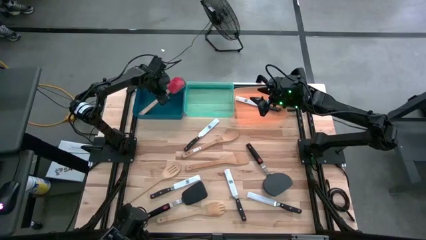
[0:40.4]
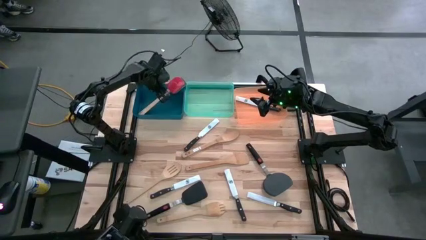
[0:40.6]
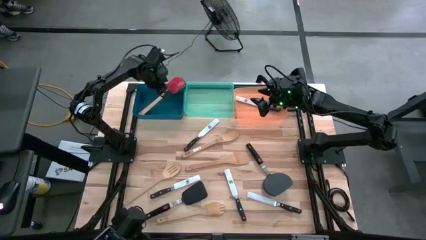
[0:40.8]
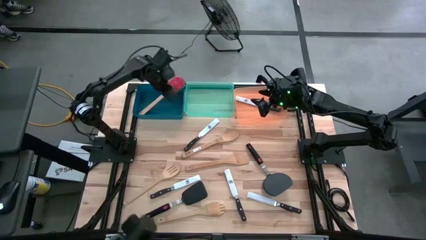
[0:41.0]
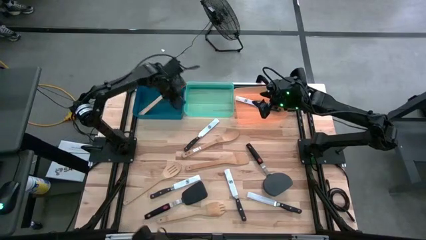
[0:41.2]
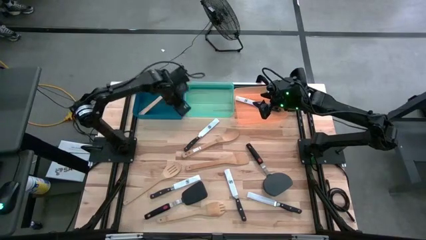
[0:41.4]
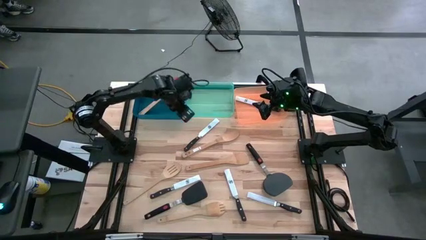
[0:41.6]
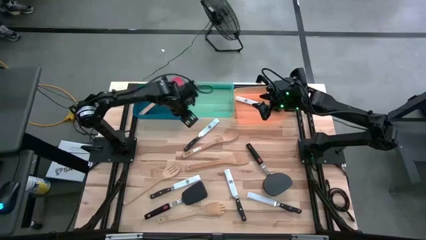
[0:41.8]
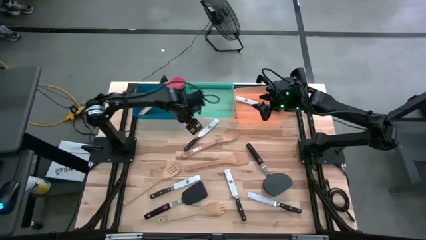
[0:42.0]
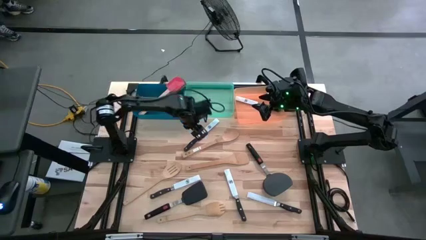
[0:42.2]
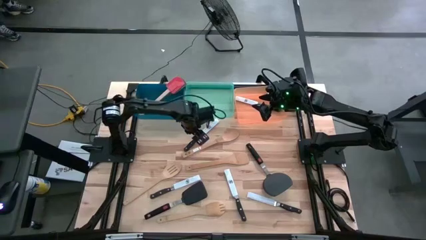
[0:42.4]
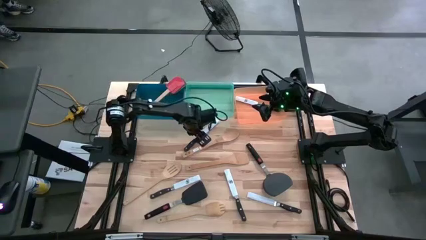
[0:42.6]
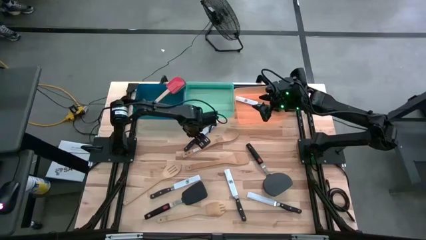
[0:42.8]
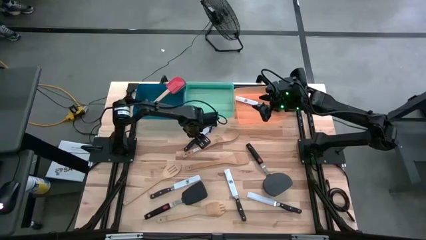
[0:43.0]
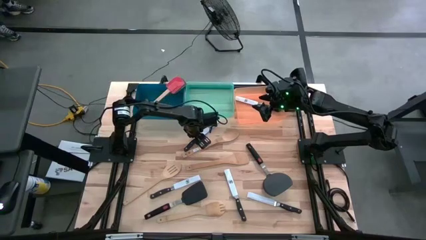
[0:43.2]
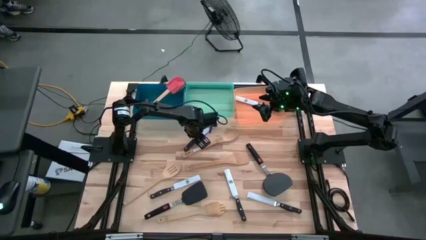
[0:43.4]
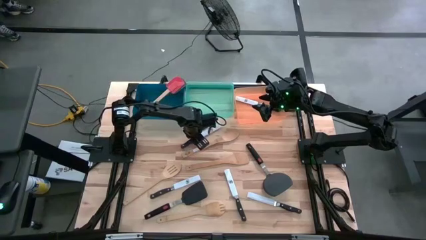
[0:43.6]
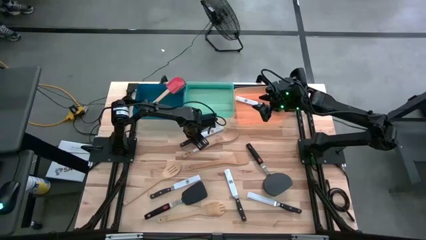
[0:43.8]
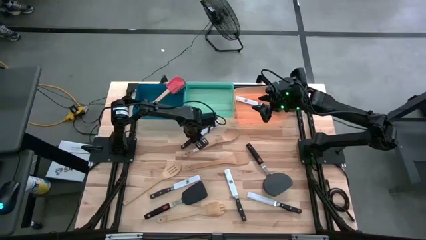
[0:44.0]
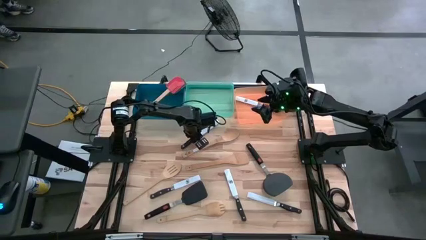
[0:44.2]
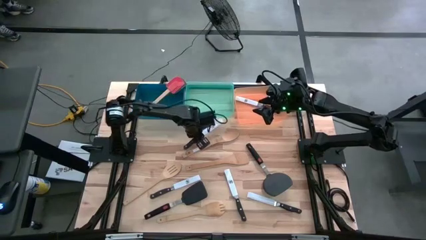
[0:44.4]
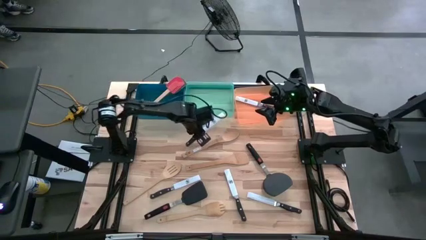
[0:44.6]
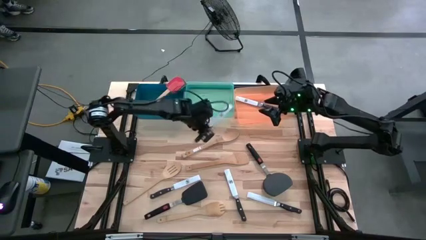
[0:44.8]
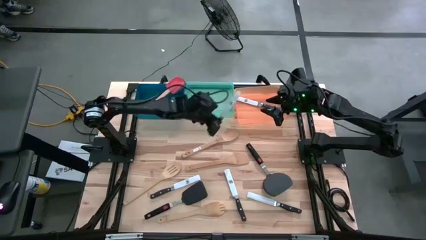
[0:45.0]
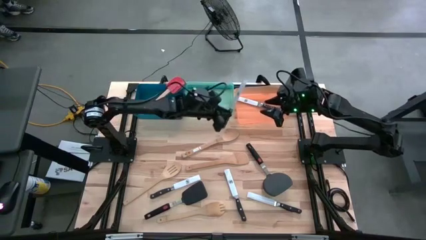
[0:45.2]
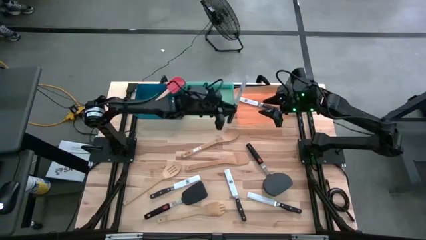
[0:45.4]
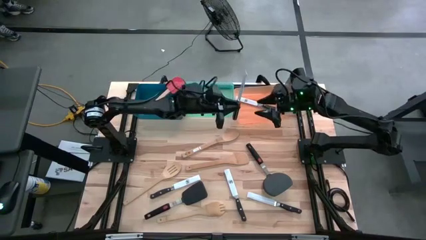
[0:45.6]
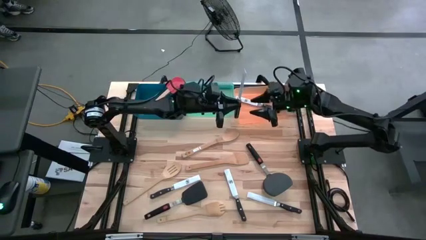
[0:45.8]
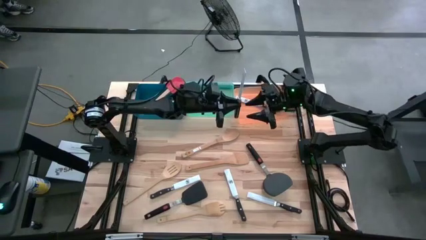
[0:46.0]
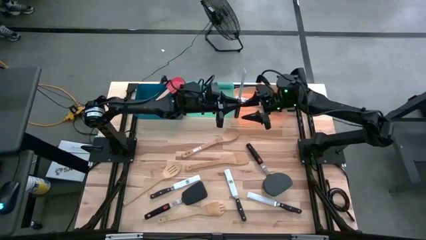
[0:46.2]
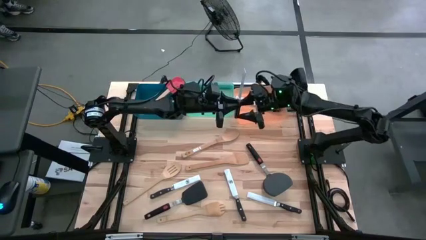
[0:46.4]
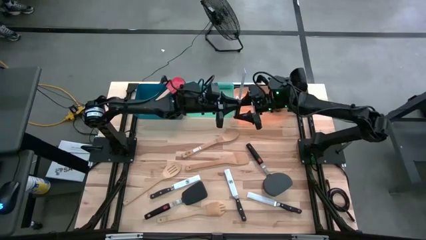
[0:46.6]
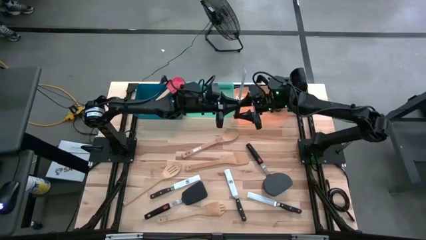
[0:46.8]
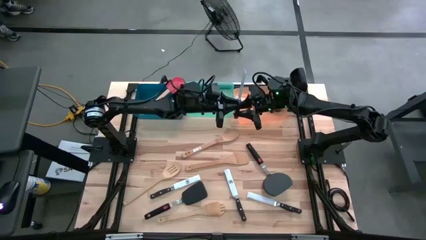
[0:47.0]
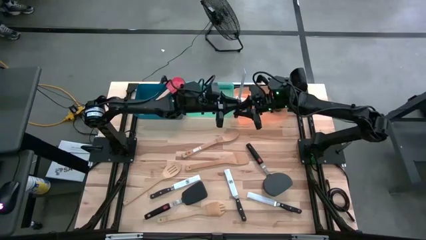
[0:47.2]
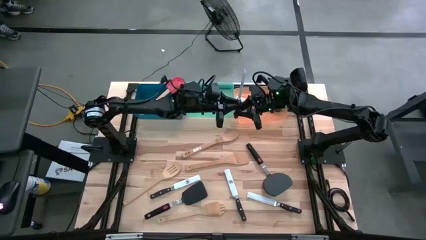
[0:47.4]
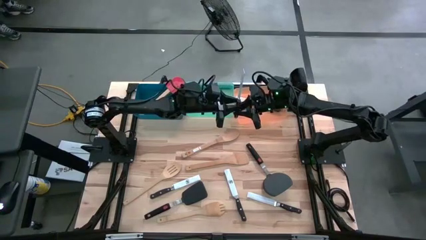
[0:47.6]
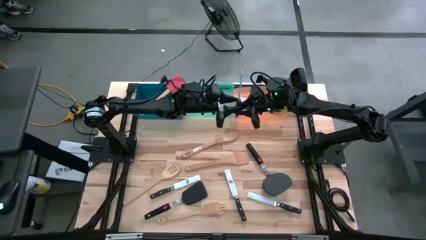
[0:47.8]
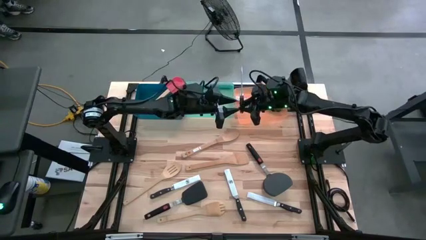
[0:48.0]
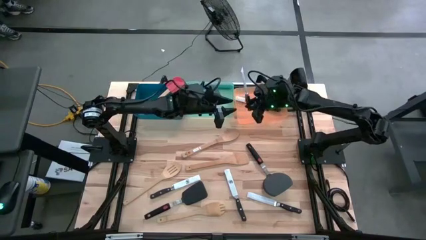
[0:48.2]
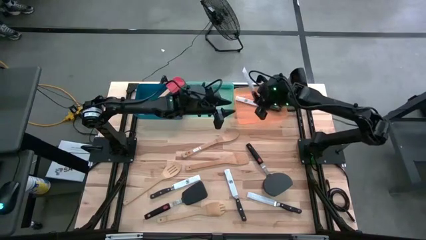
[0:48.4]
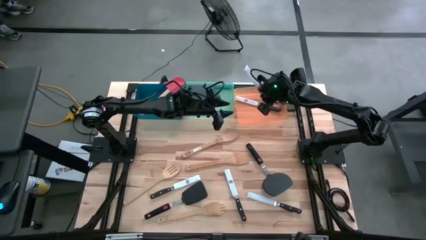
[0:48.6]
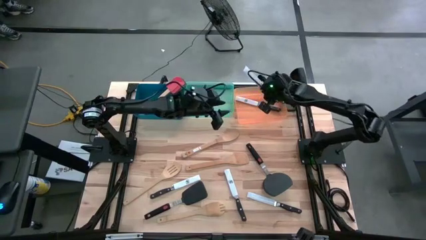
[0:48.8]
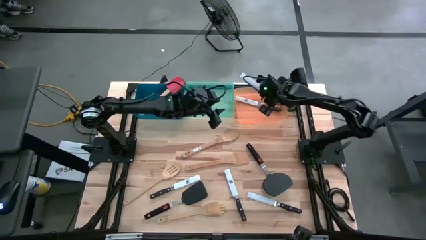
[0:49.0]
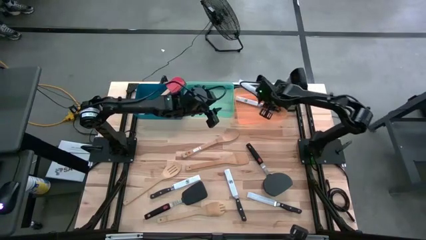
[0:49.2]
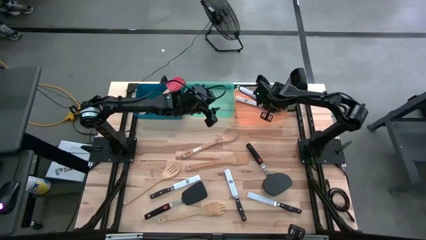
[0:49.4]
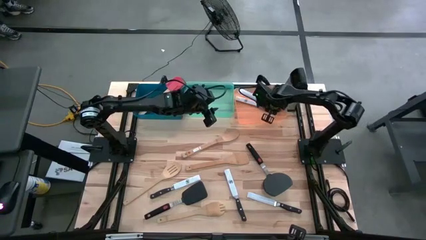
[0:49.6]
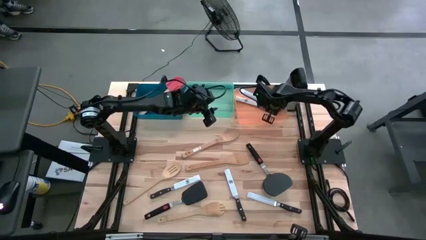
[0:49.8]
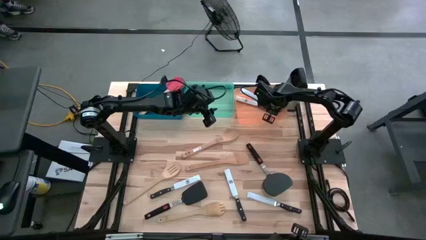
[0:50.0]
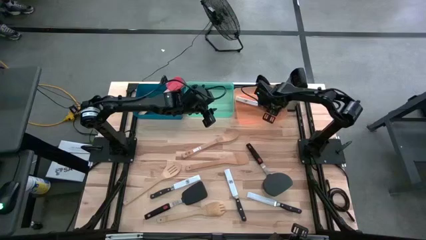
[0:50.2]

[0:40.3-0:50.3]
Task: Pick & Place Kitchen Items
Put the knife into the orange bin
